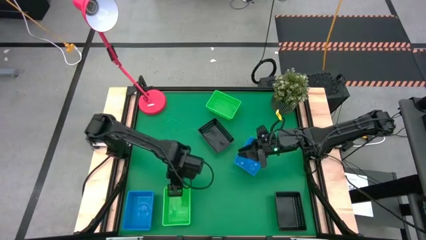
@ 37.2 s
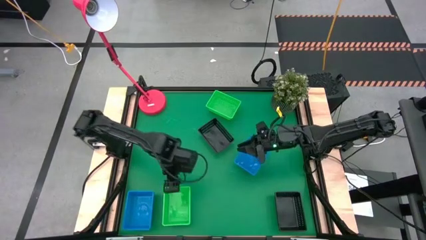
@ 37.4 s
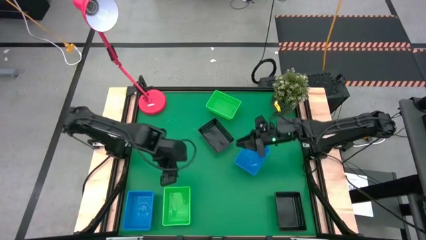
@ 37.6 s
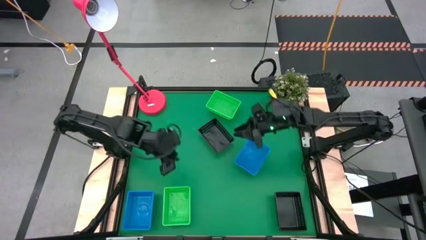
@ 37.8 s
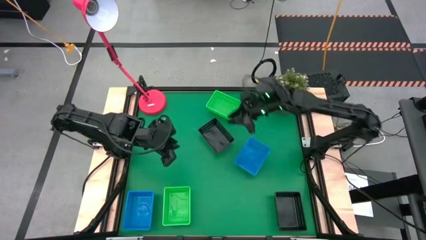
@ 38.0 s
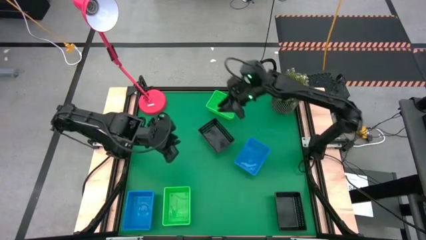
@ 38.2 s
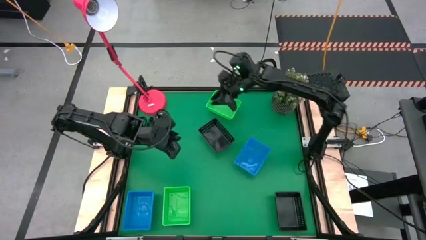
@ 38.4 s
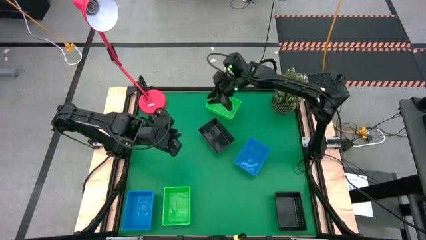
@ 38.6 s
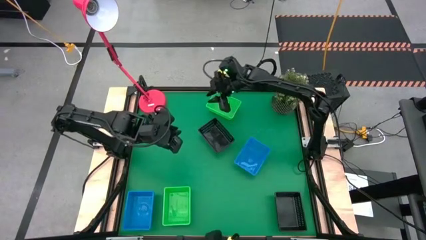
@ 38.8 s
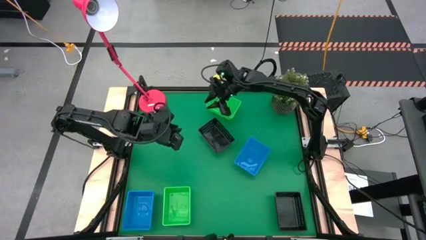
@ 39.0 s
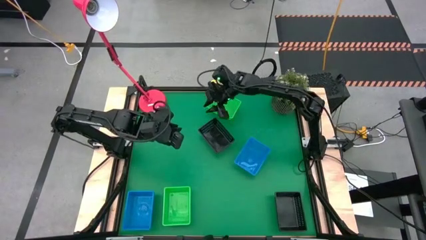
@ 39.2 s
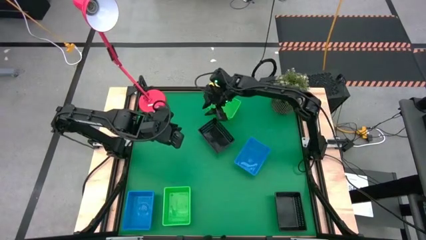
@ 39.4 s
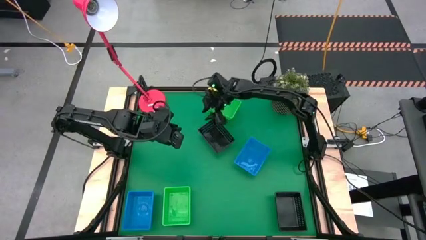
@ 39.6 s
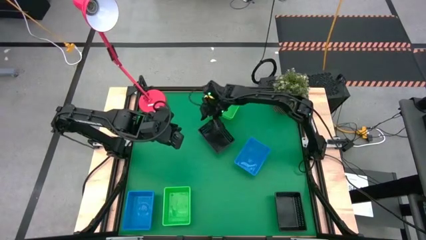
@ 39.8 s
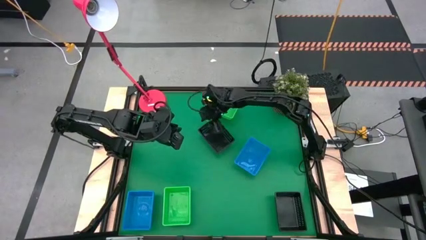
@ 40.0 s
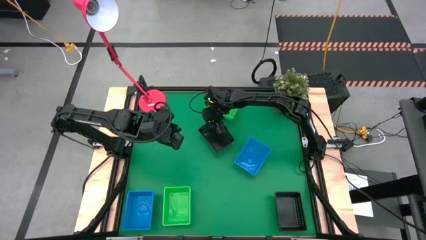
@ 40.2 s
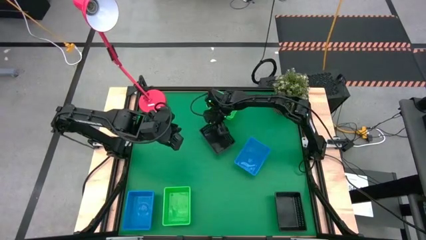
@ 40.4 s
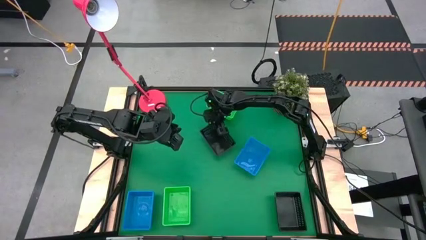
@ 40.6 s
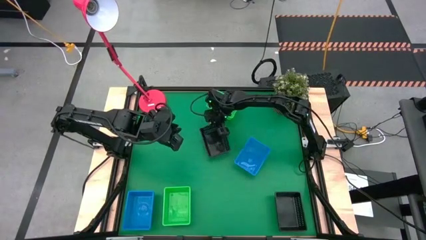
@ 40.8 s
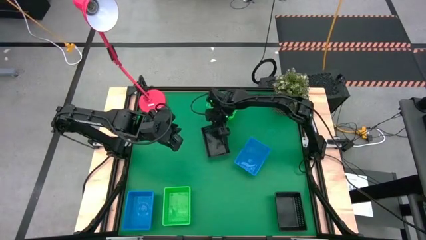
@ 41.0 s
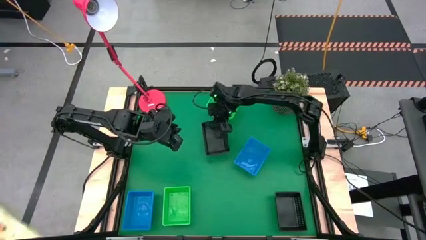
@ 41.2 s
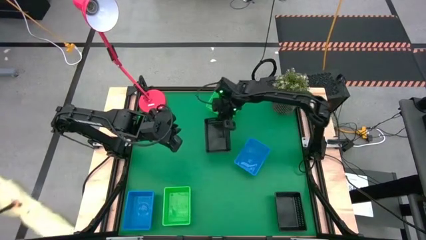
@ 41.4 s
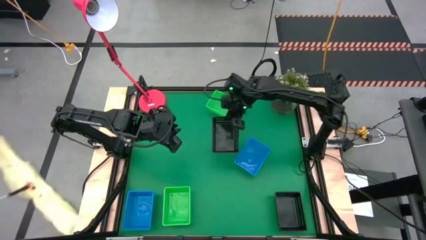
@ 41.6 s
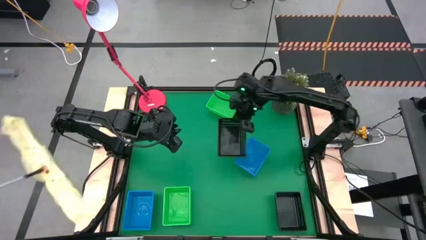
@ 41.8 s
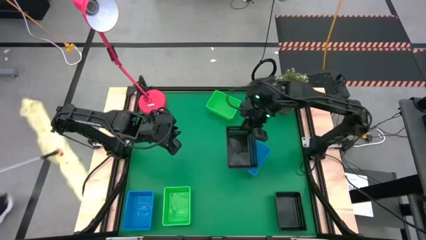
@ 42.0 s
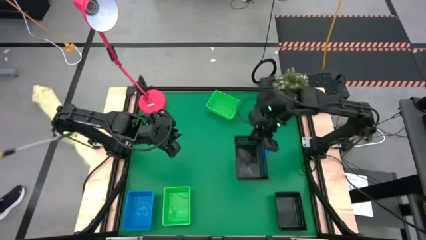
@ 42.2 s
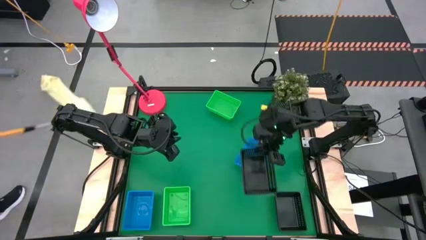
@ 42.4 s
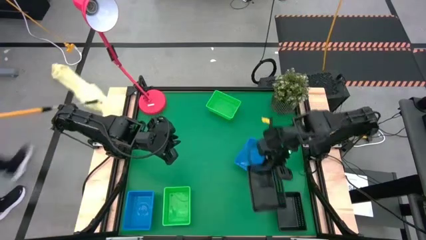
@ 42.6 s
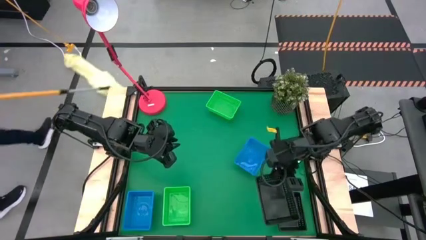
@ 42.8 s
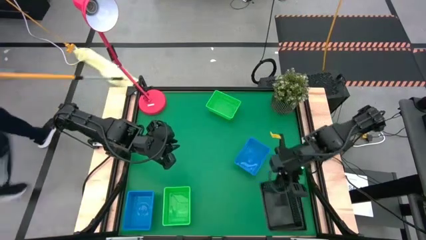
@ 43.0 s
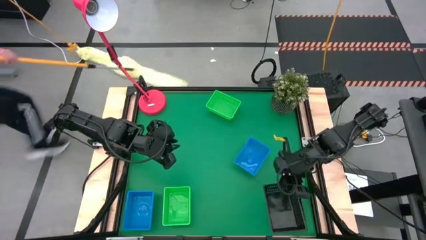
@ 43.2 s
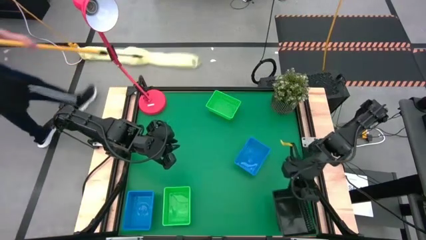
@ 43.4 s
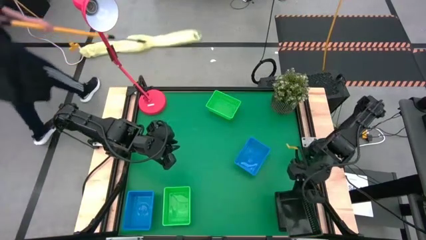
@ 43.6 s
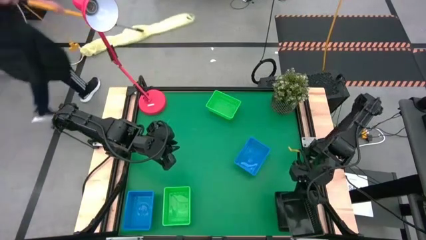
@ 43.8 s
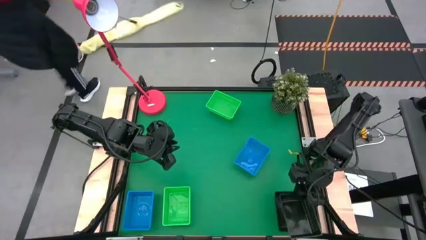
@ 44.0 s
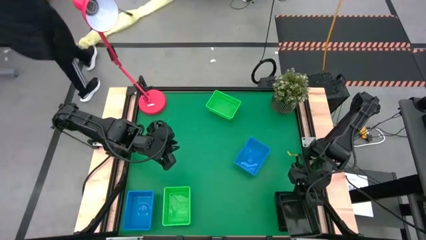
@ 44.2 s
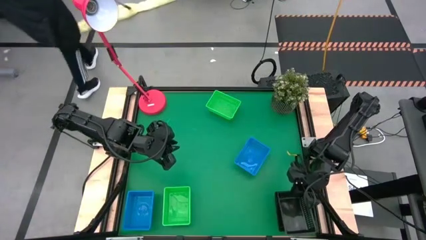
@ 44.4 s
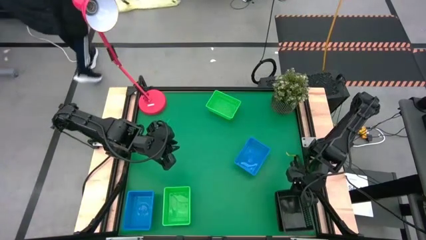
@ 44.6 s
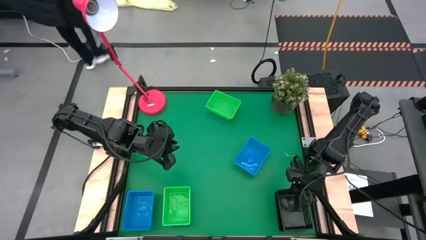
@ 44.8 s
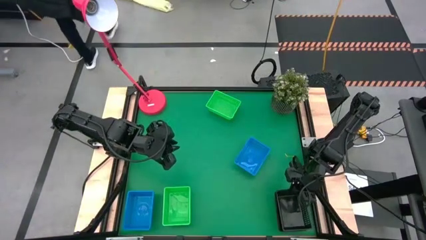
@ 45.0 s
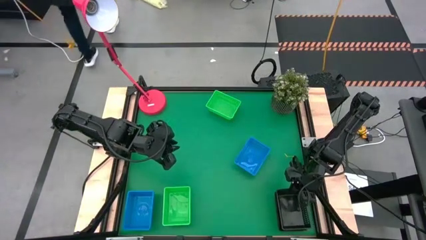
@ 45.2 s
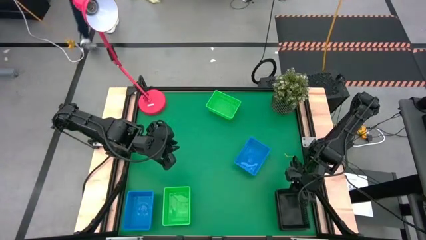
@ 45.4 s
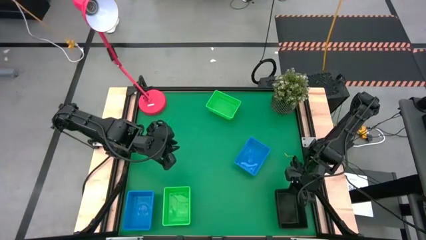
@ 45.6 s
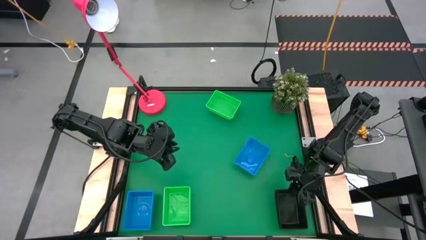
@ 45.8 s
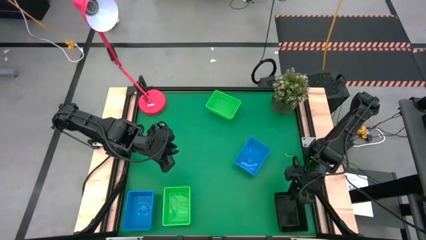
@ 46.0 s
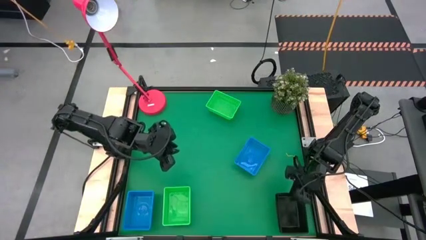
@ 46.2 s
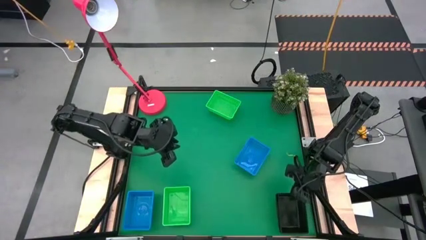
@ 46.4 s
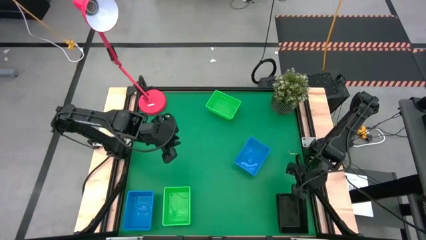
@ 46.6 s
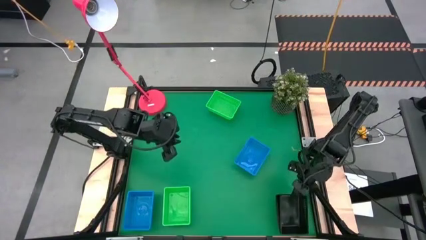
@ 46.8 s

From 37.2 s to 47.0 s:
Stack the top black bin on top of the bottom black bin

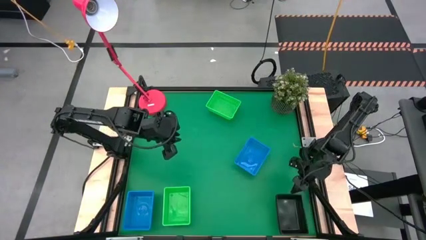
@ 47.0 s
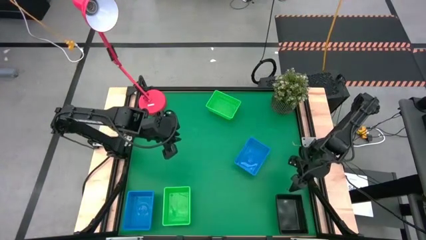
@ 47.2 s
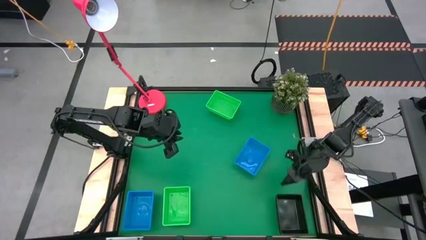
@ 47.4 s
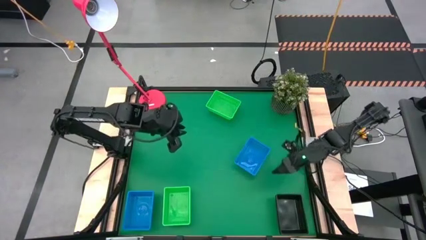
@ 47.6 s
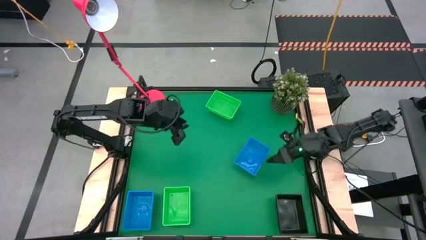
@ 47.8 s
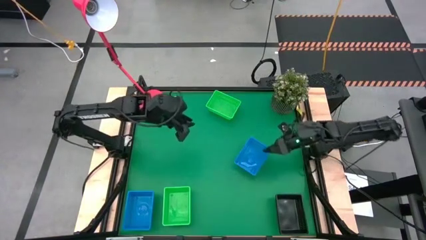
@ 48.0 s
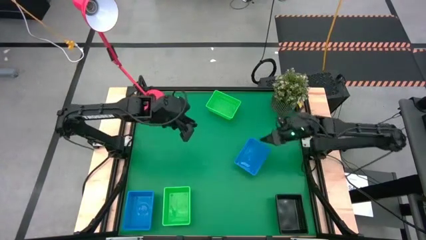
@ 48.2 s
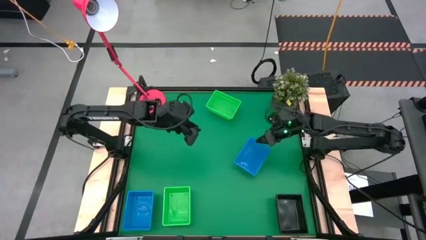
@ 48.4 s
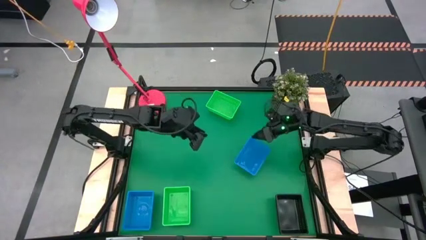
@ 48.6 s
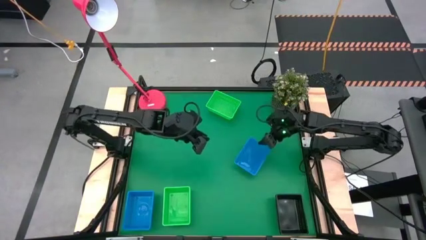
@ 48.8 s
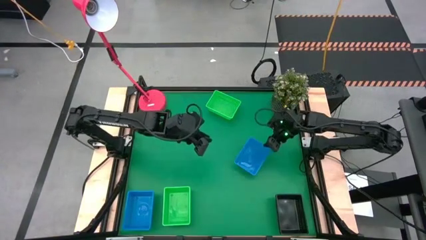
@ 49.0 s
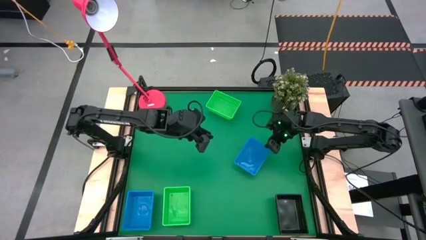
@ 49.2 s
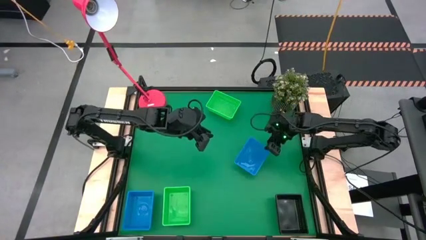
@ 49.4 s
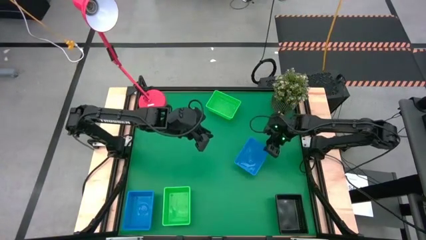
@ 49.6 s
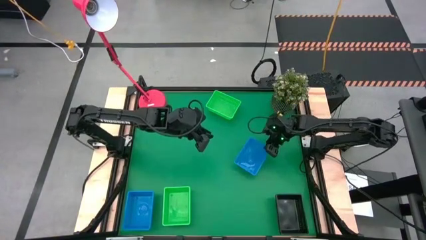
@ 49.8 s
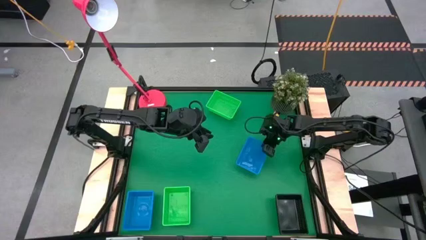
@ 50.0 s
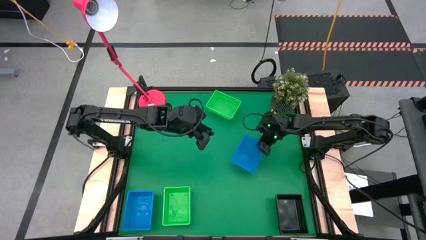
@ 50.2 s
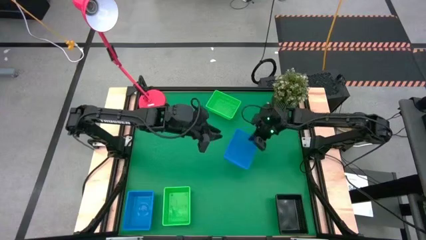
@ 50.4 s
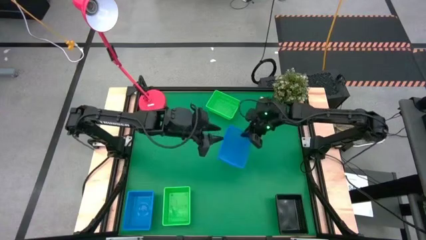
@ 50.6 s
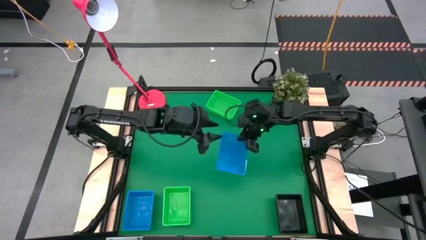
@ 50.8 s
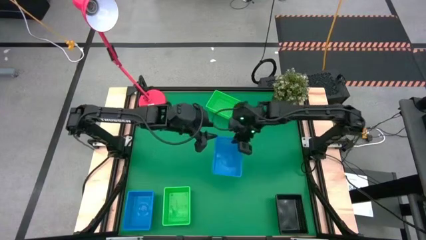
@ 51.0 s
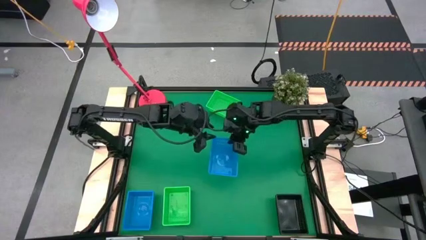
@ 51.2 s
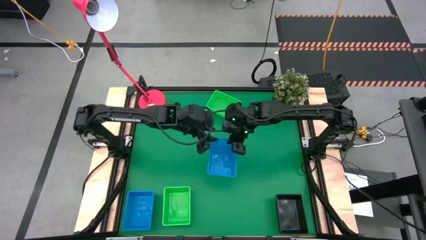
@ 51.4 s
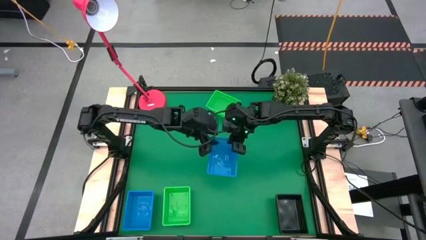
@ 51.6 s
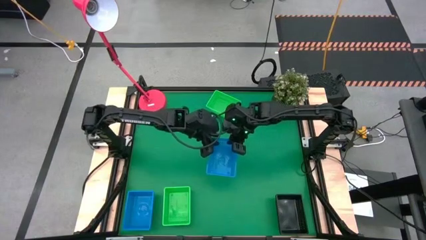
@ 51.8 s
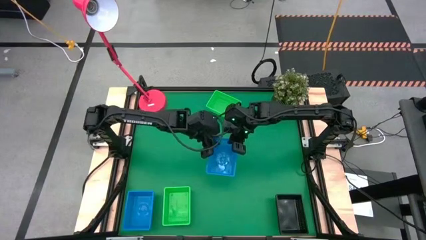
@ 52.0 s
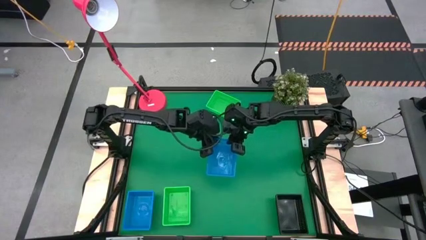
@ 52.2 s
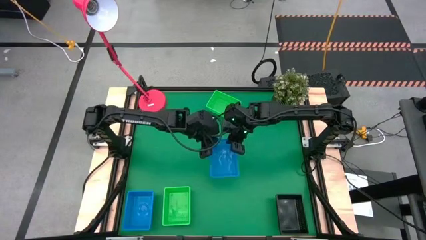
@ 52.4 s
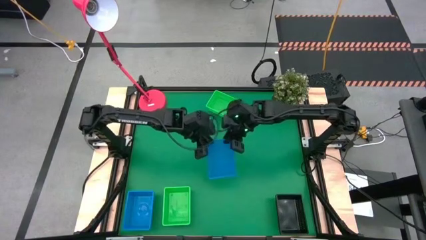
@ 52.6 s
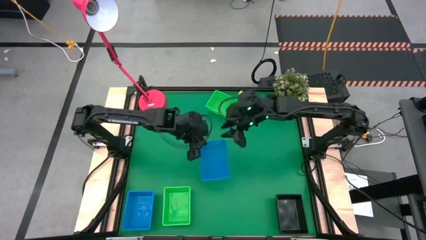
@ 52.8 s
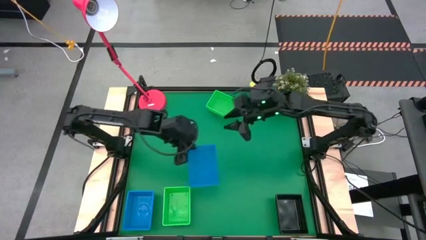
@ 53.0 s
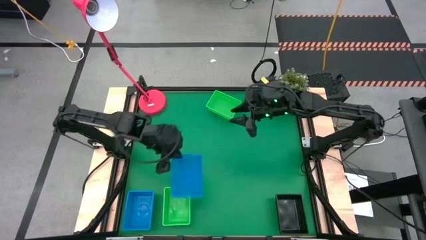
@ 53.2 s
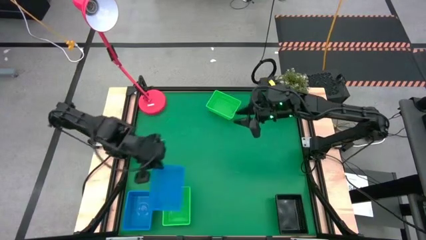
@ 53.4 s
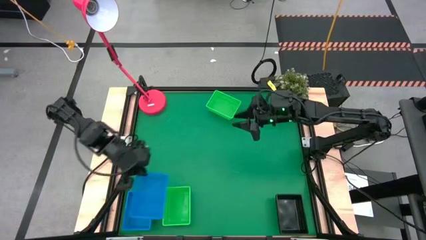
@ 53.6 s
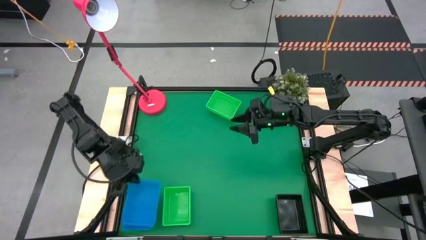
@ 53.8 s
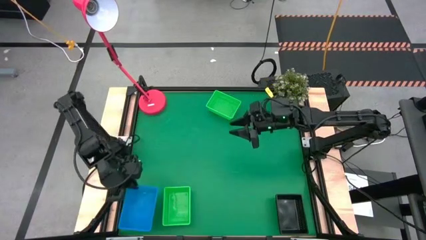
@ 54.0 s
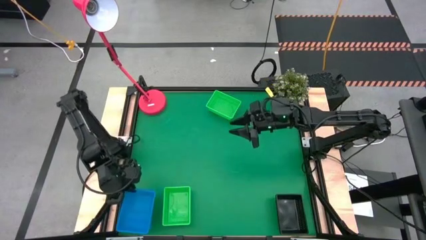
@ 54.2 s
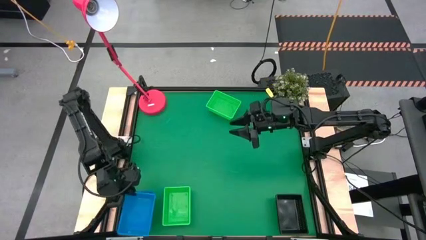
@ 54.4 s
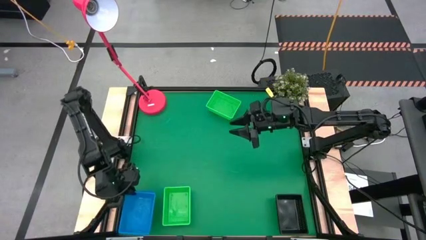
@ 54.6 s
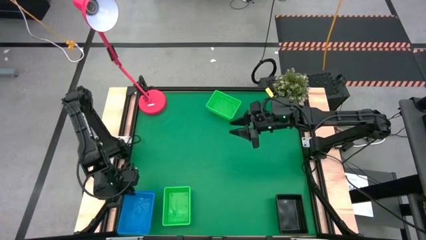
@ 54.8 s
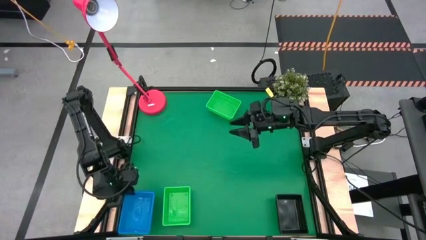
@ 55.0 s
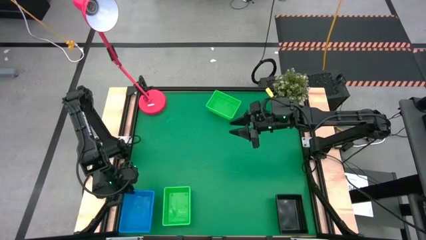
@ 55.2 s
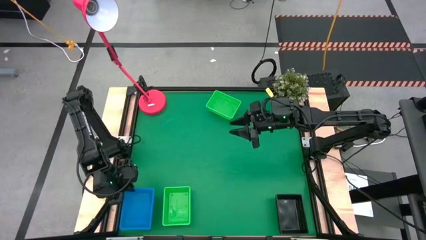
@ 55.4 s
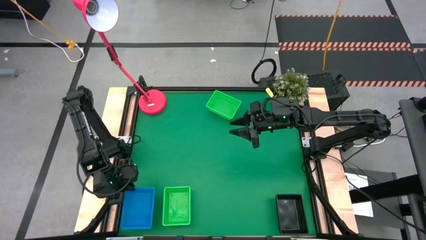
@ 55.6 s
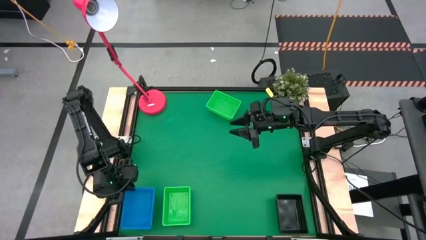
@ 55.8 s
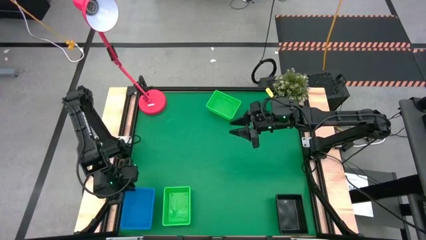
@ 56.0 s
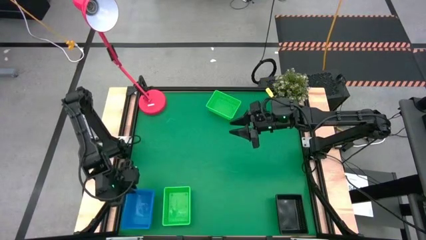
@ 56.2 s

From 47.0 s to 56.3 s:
Stack the top blue bin on top of the bottom blue bin
